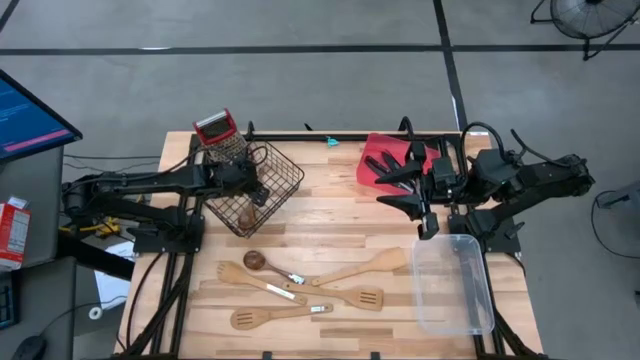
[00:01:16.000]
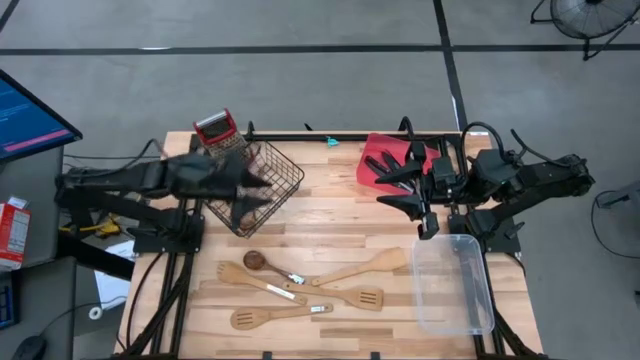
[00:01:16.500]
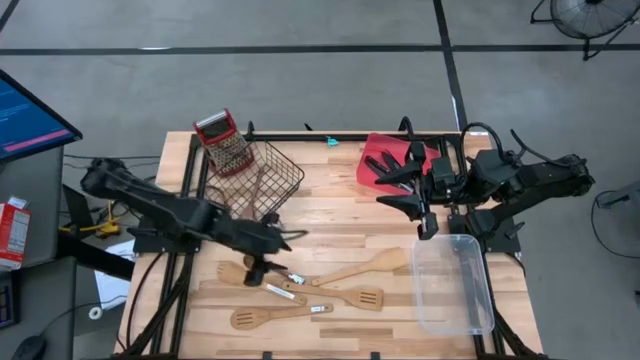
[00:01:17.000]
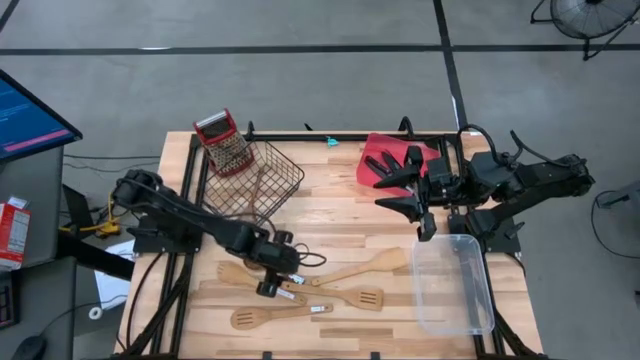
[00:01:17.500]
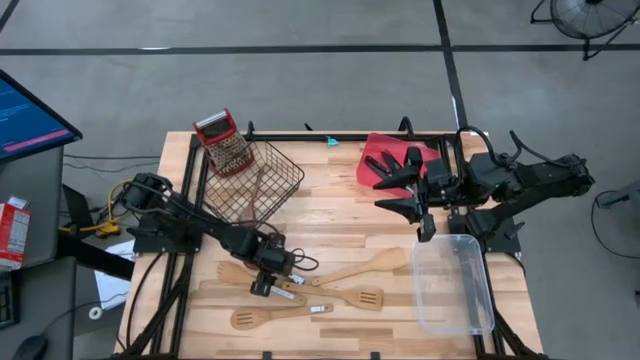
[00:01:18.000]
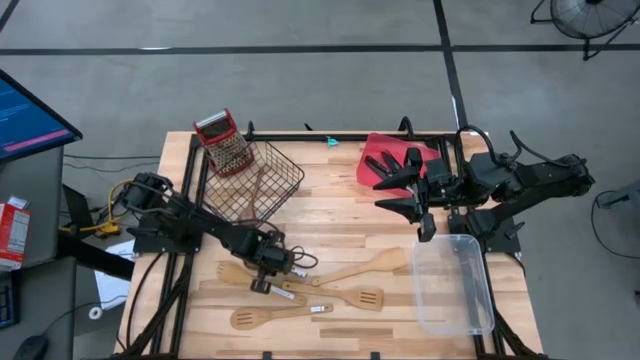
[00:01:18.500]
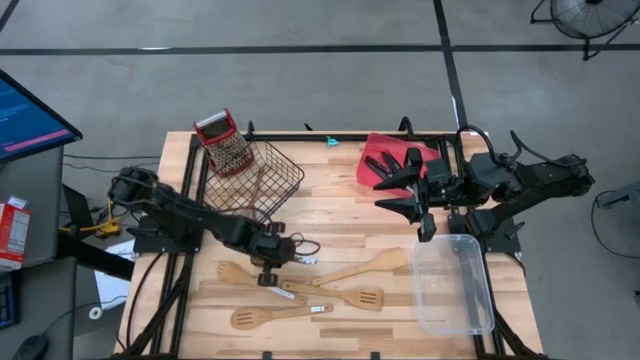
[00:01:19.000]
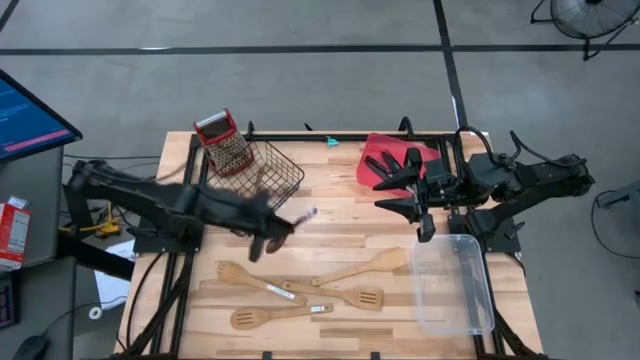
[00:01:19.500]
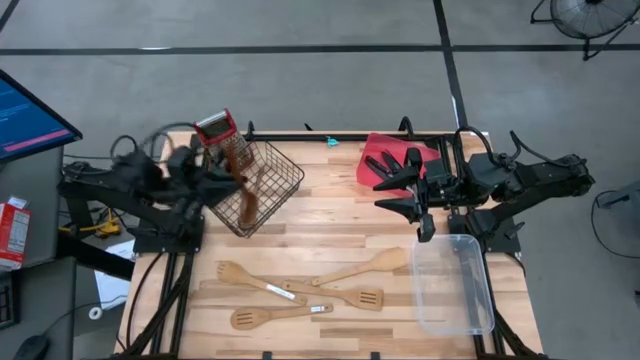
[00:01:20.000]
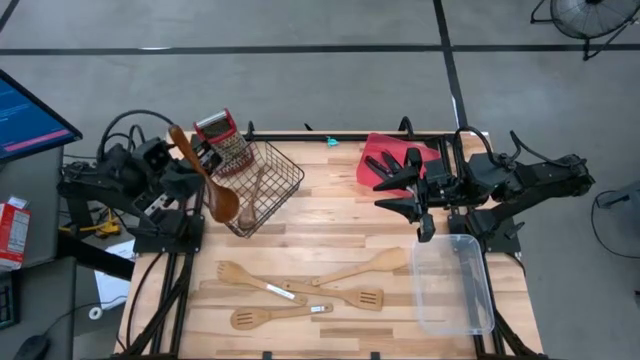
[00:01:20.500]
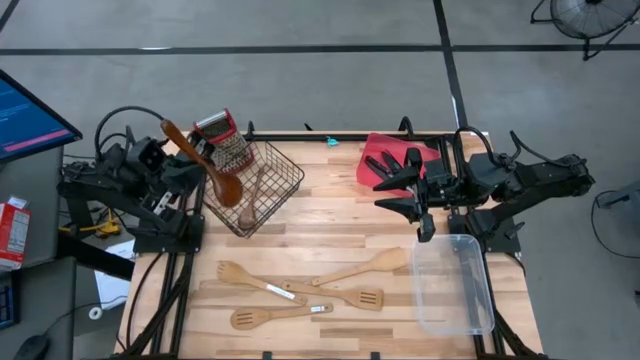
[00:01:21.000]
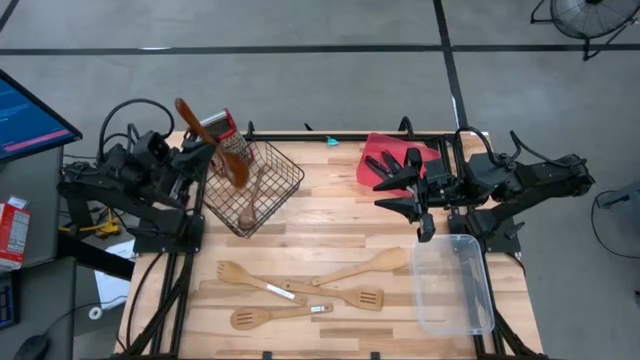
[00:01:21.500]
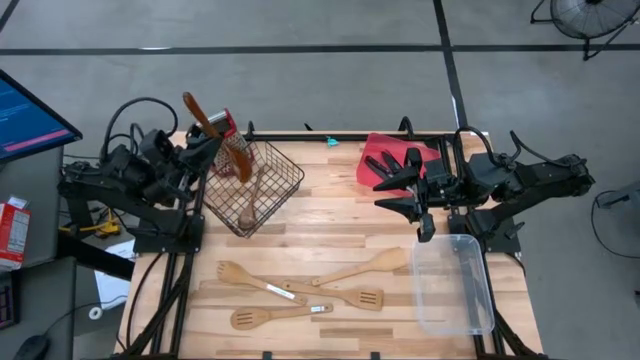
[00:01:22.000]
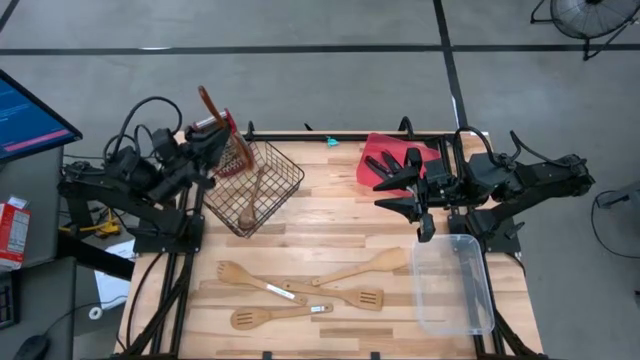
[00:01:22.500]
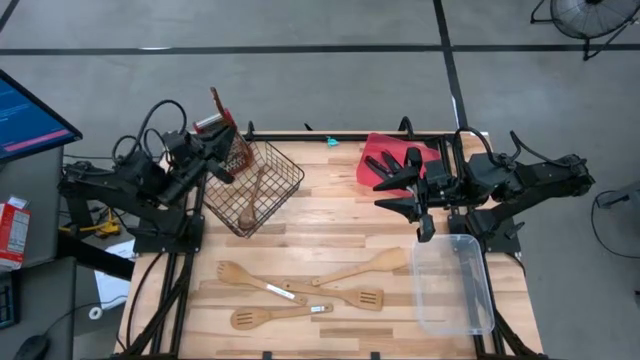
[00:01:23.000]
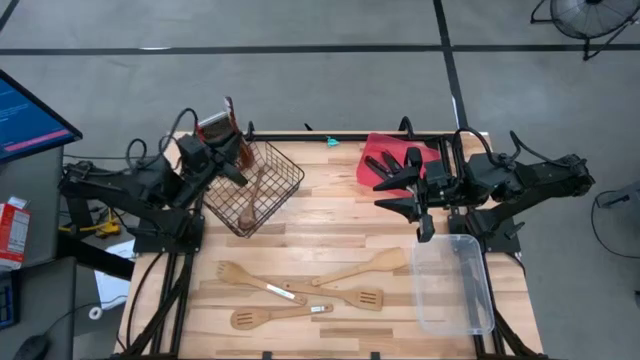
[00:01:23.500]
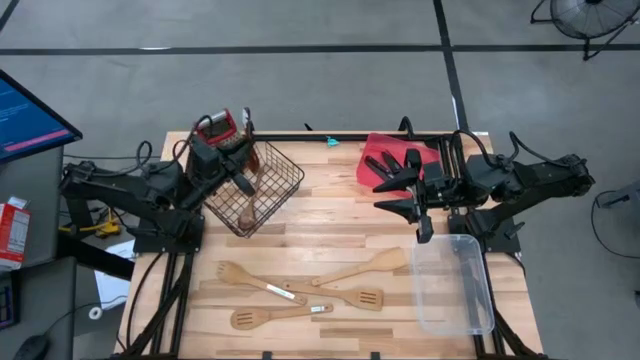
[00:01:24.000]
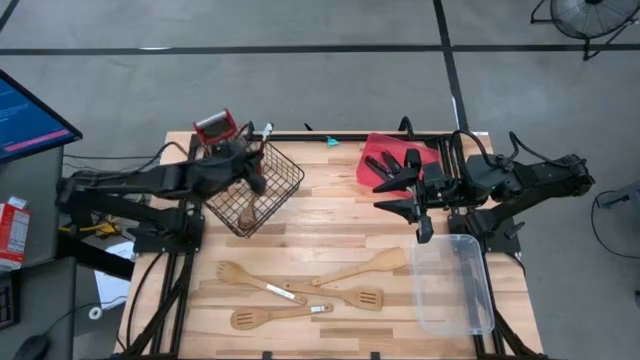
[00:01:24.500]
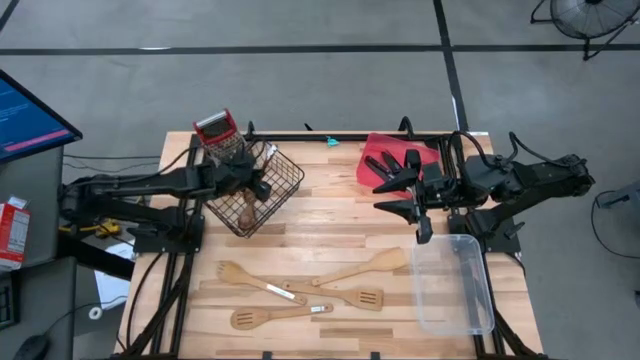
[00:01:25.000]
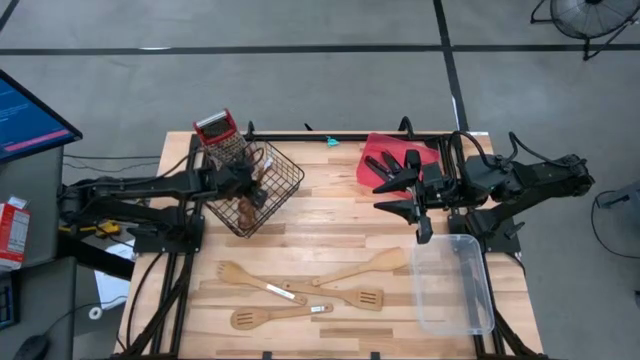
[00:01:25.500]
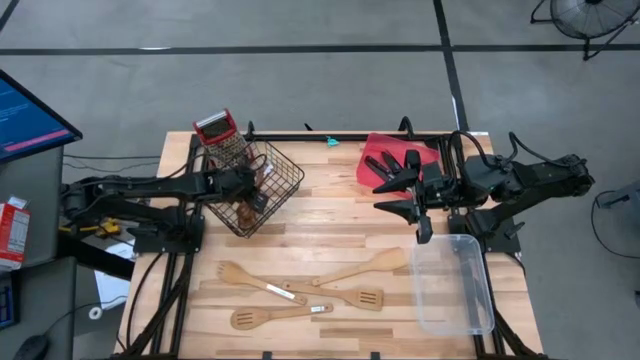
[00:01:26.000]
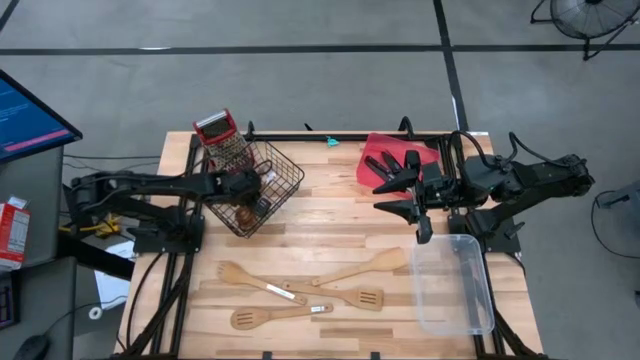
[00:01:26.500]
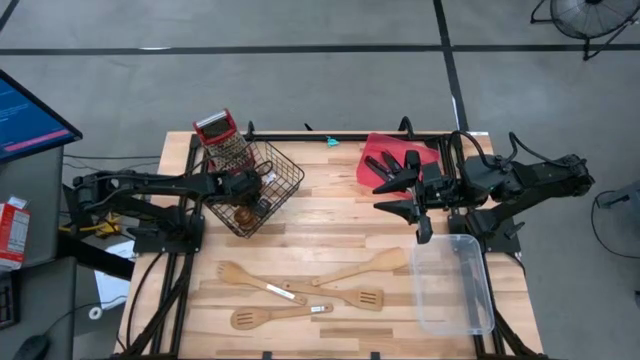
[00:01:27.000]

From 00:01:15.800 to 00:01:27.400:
Task: Pick & Place Kitchen Items
Put the dark brown serving spoon into the black wire basket

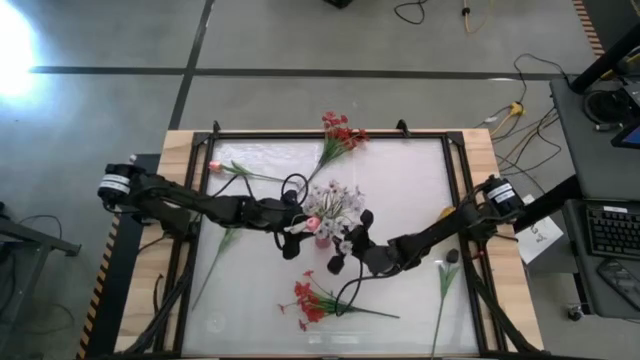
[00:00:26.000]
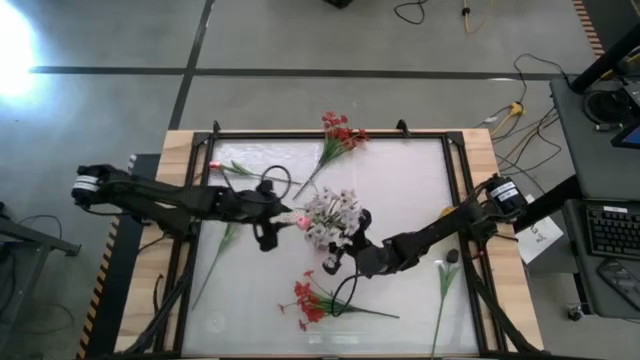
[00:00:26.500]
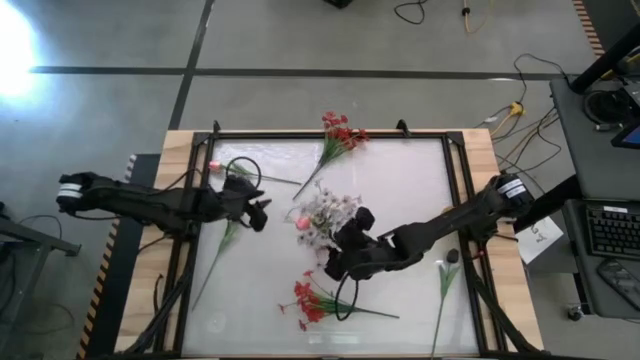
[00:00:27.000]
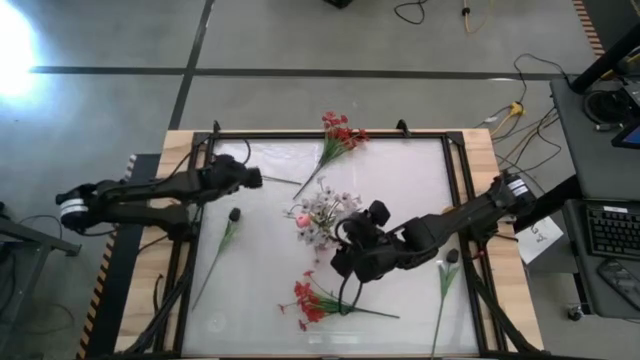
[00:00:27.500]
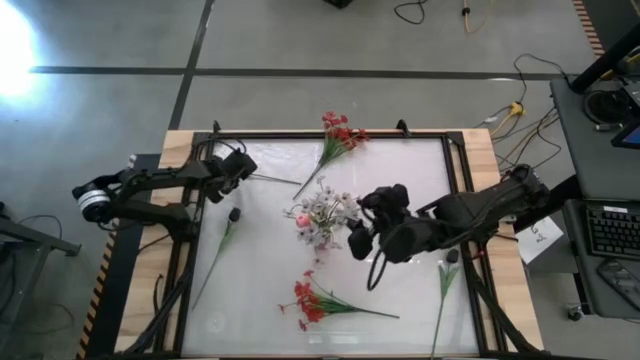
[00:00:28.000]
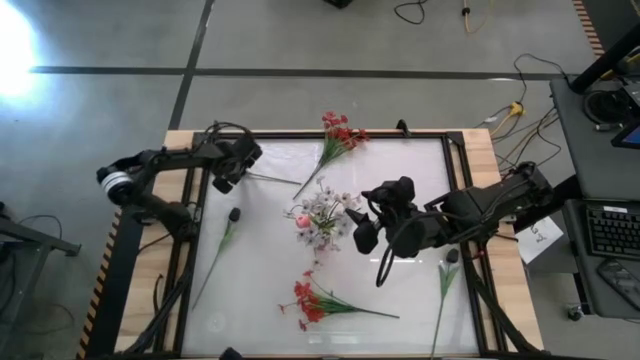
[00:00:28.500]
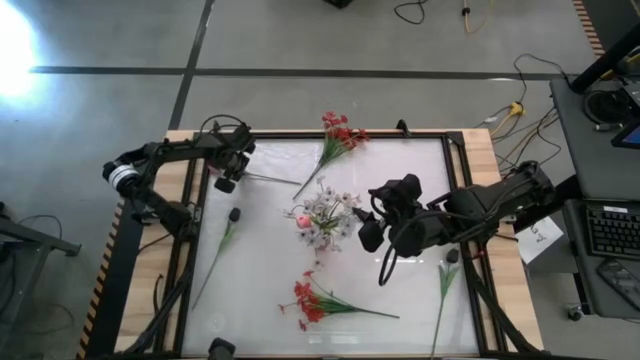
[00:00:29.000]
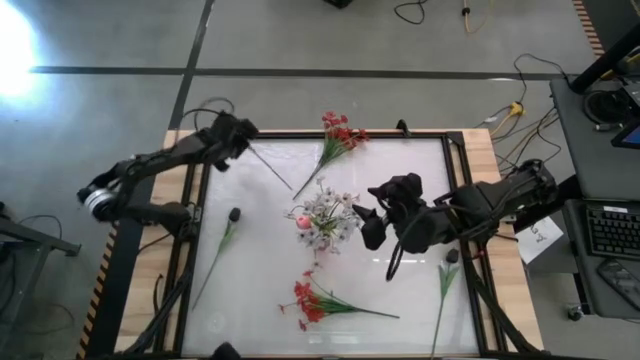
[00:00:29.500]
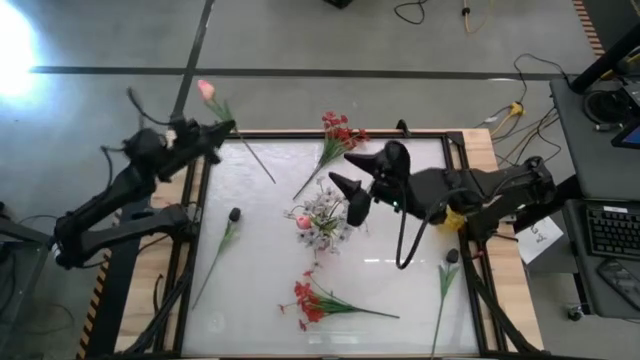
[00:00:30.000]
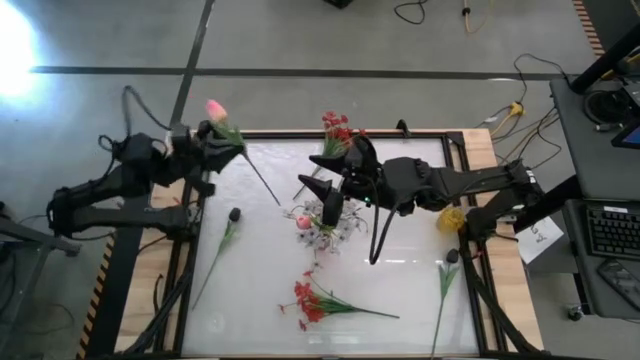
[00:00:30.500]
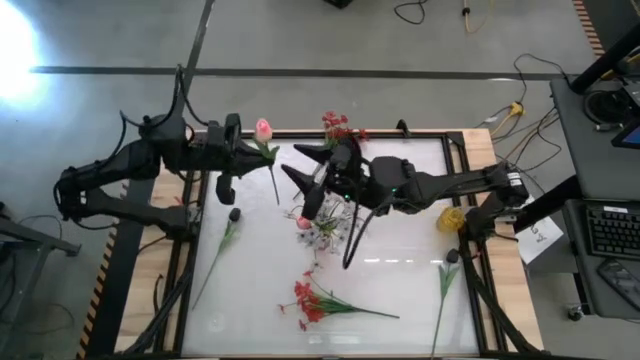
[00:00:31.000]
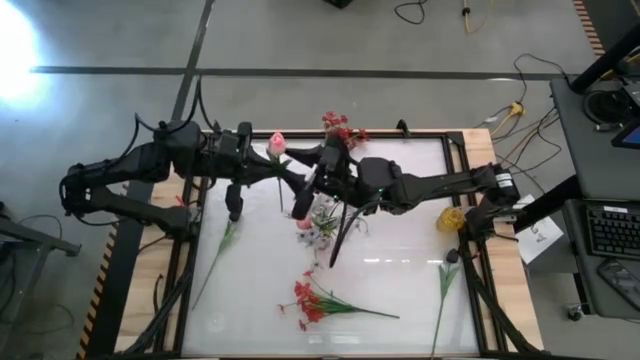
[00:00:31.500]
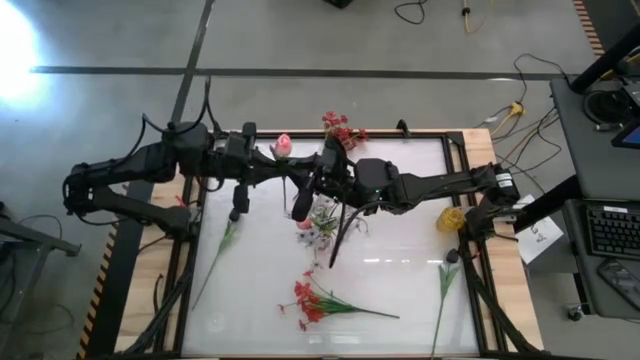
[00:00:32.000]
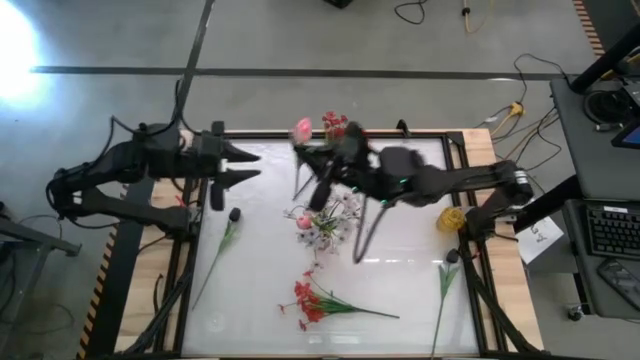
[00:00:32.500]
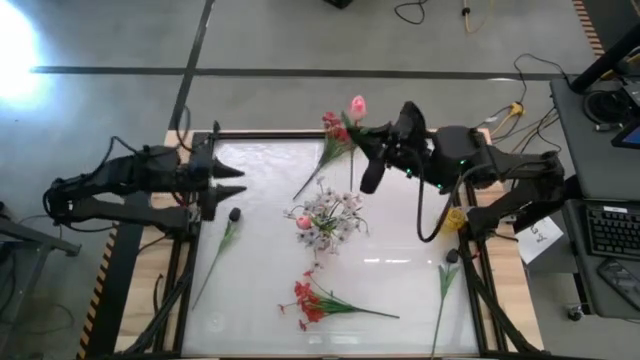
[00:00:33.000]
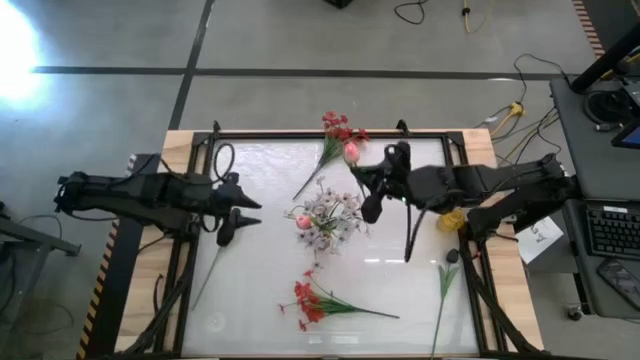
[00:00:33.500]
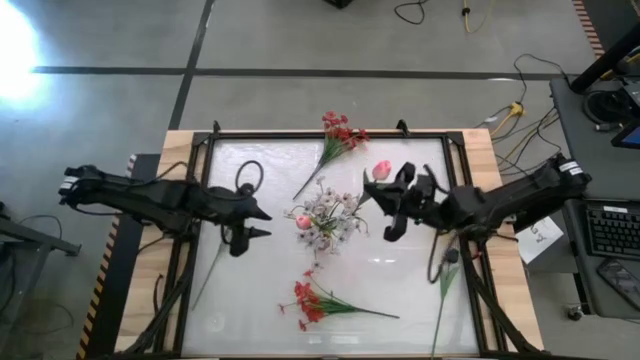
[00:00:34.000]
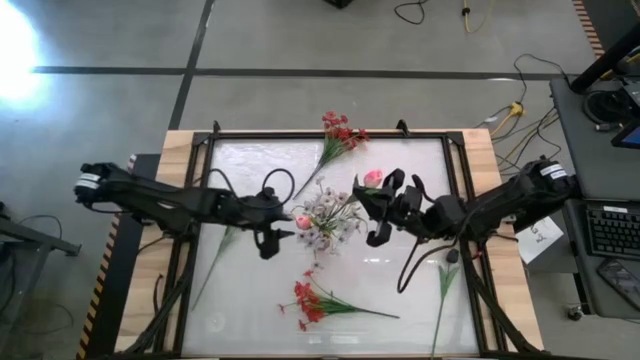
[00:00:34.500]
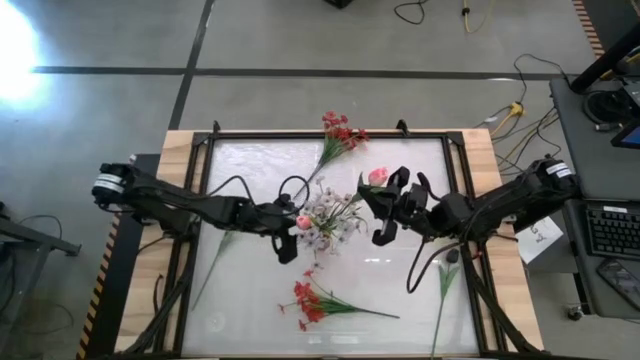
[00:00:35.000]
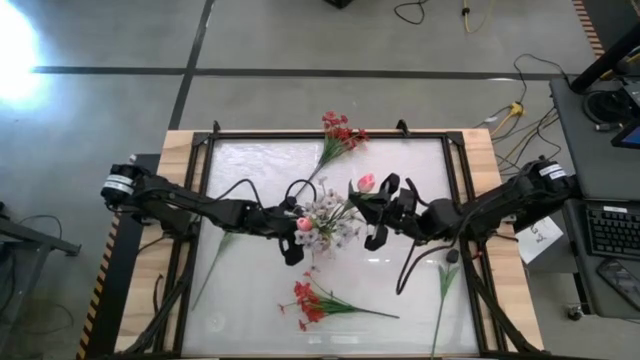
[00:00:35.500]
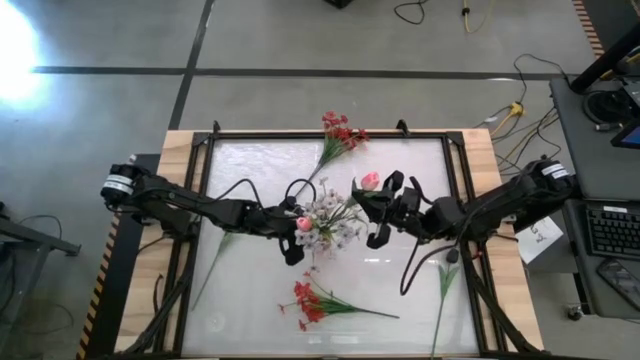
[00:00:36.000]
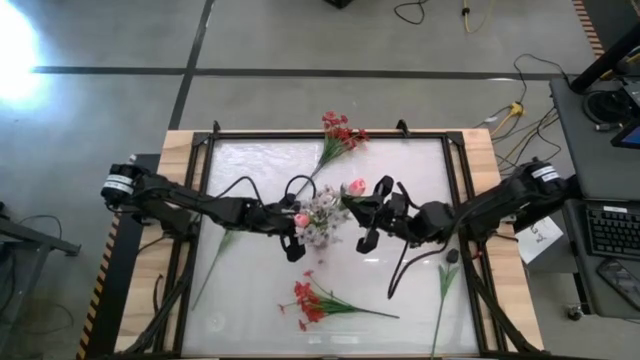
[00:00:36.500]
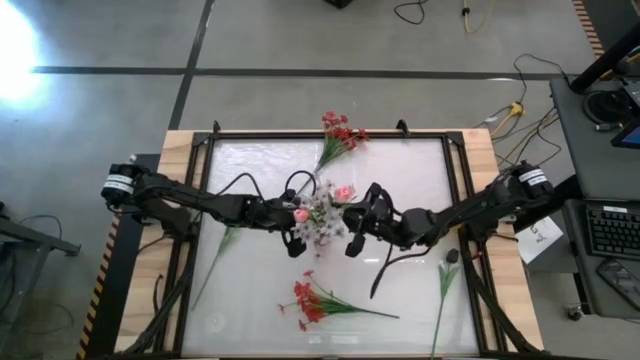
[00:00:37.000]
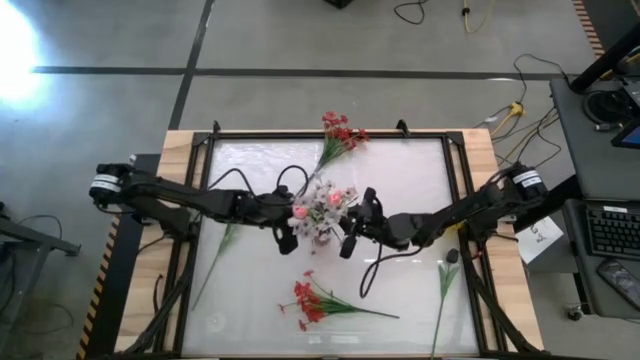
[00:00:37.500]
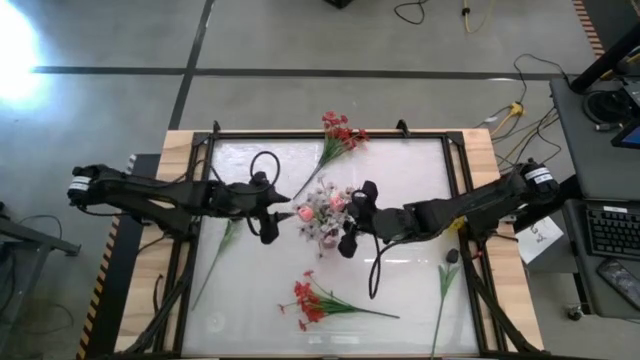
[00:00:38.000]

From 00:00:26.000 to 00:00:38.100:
Task: Sort flowers into vase by color
Put the pink flower into the red vase
